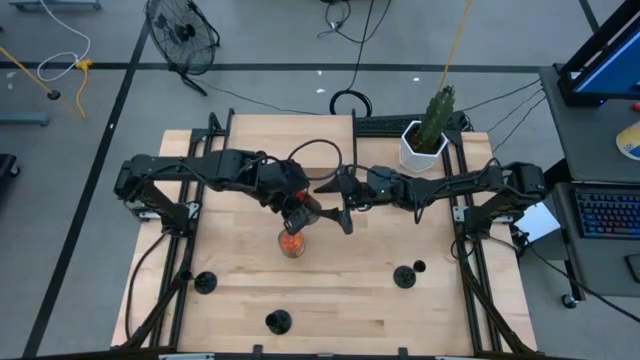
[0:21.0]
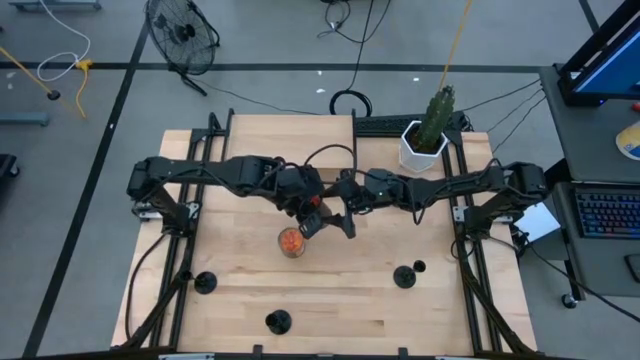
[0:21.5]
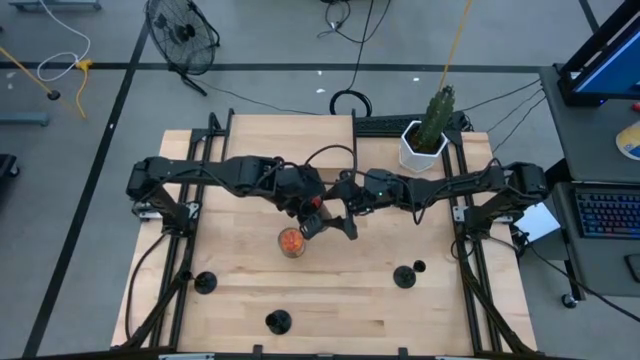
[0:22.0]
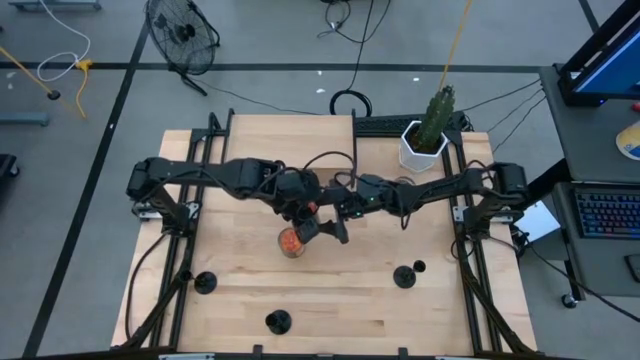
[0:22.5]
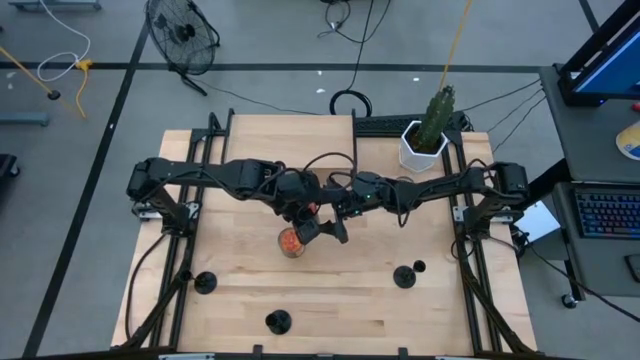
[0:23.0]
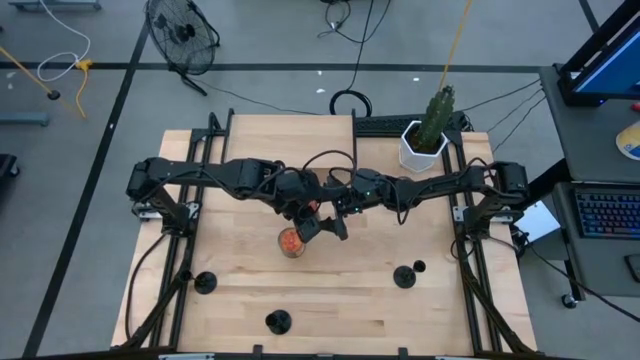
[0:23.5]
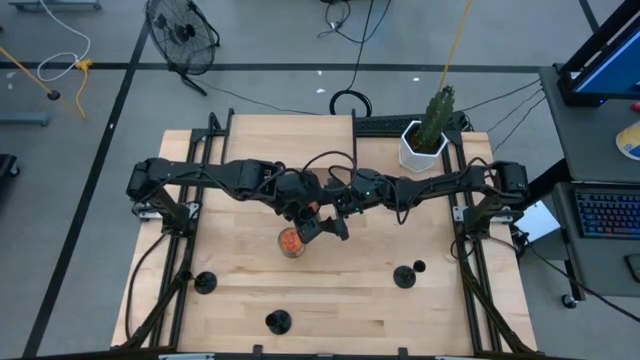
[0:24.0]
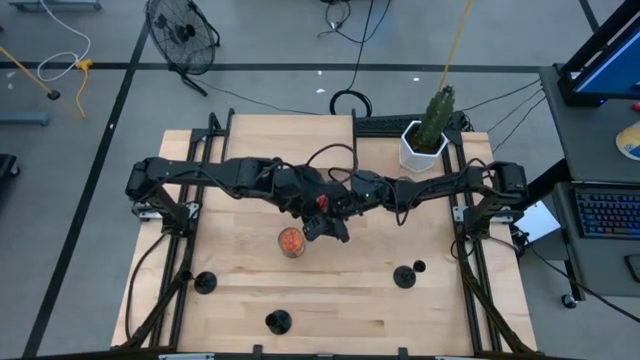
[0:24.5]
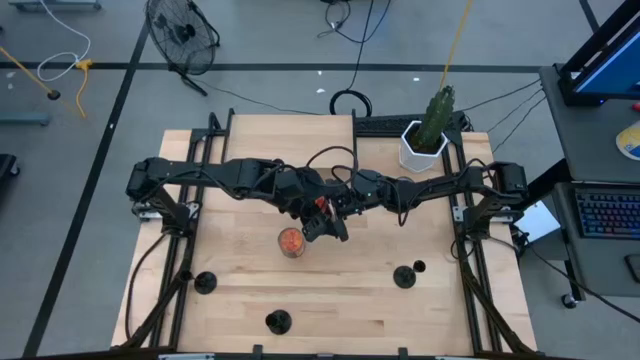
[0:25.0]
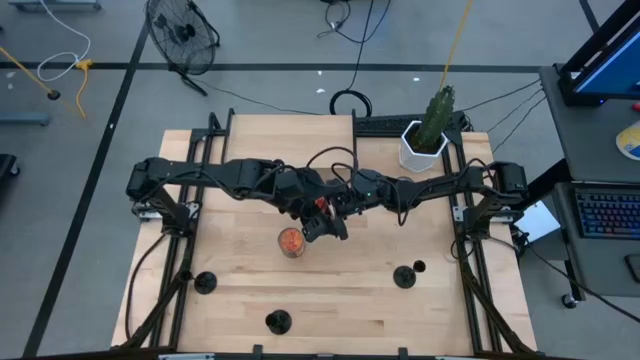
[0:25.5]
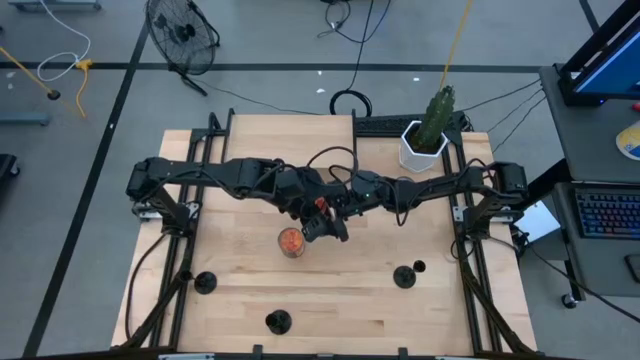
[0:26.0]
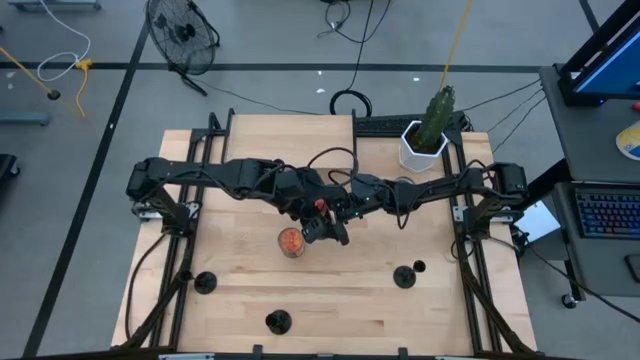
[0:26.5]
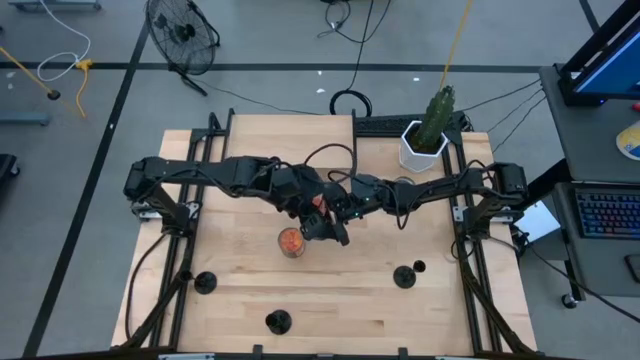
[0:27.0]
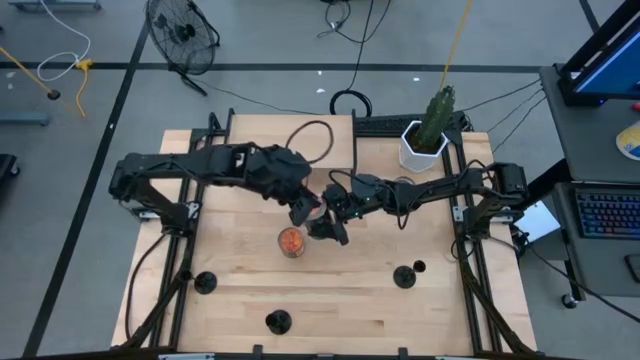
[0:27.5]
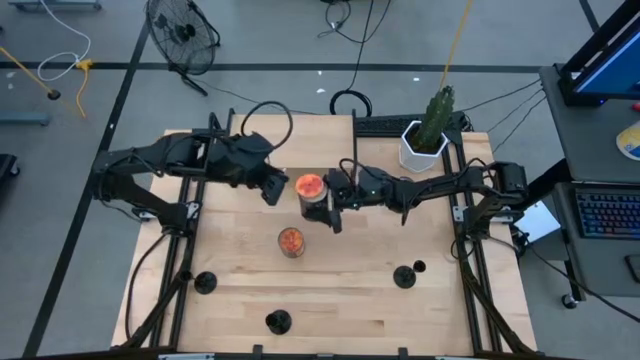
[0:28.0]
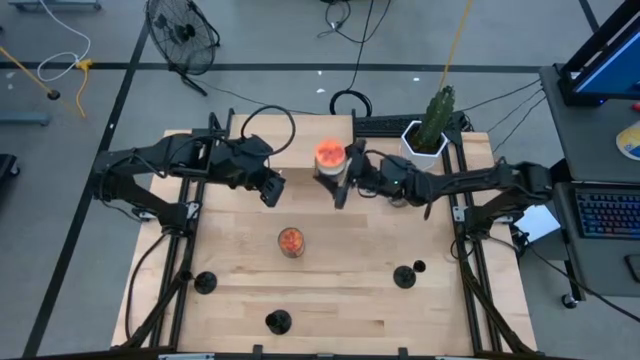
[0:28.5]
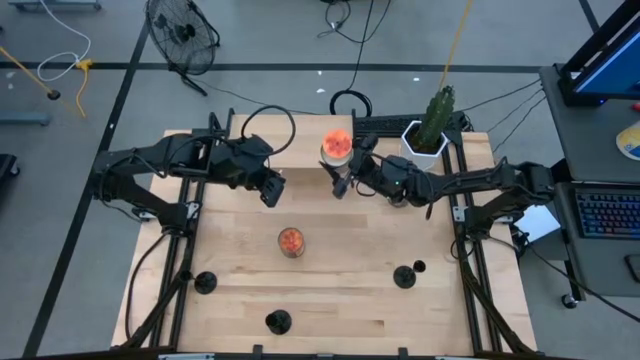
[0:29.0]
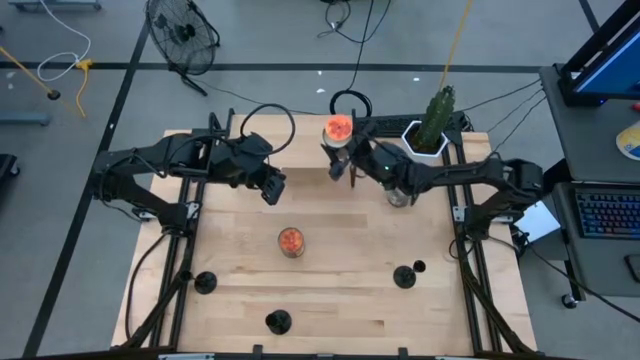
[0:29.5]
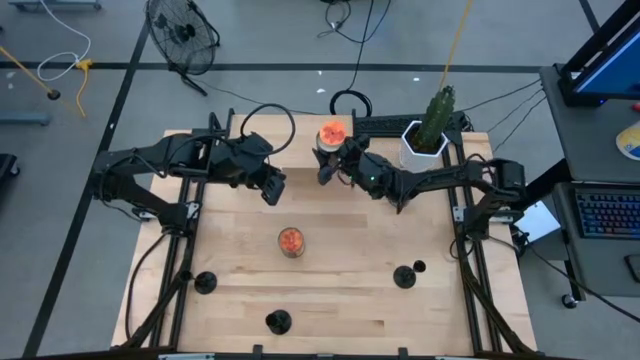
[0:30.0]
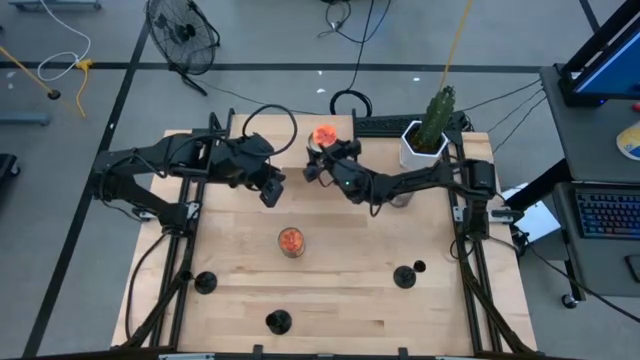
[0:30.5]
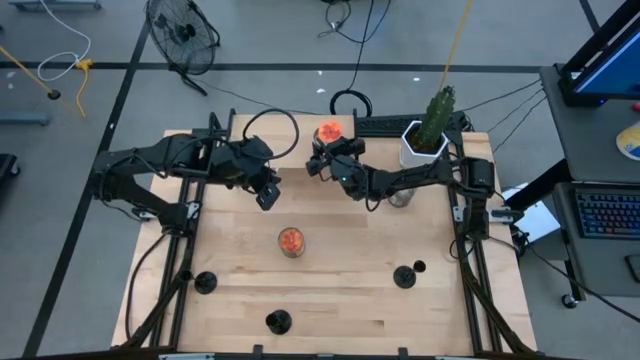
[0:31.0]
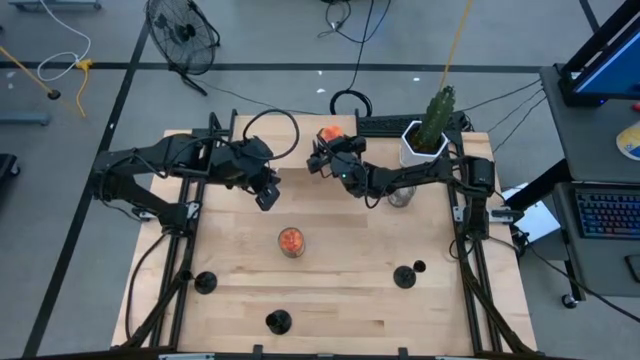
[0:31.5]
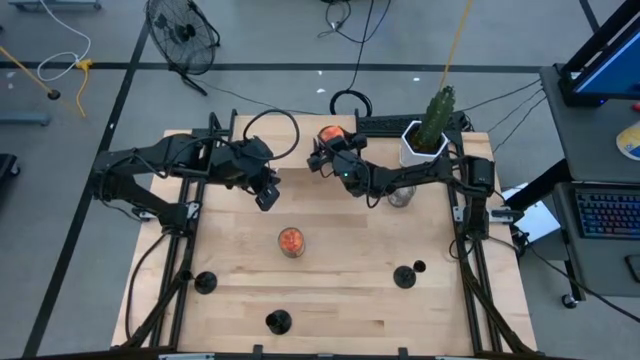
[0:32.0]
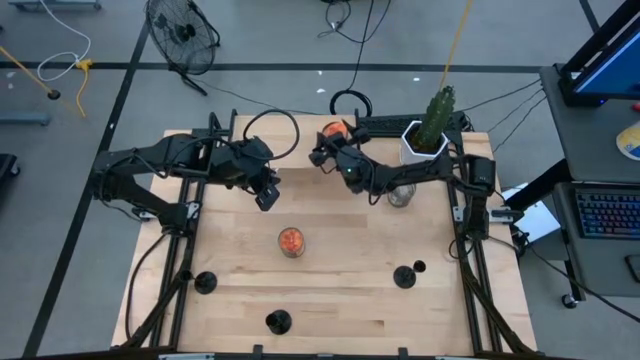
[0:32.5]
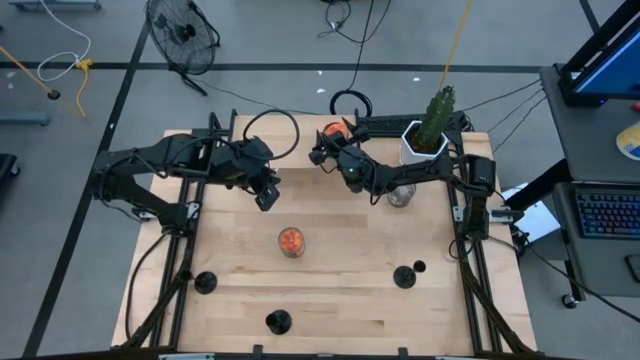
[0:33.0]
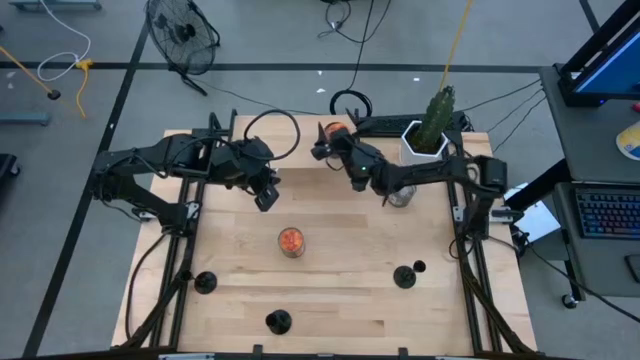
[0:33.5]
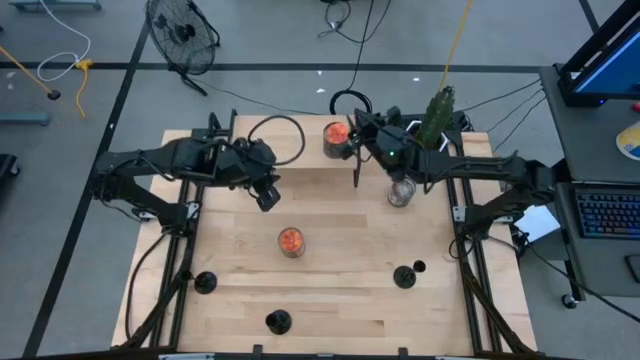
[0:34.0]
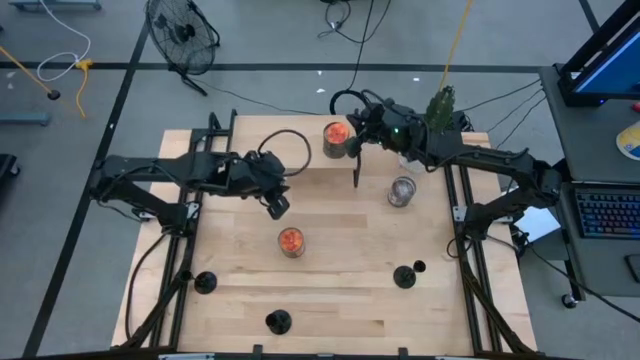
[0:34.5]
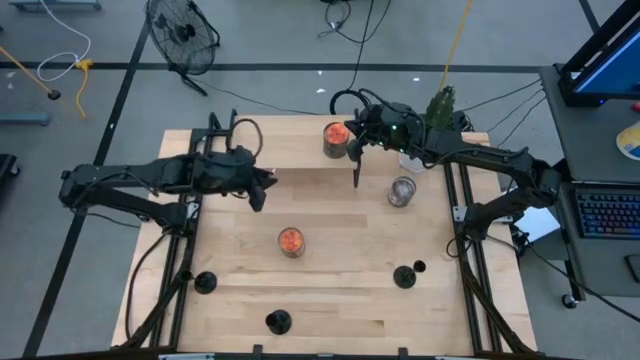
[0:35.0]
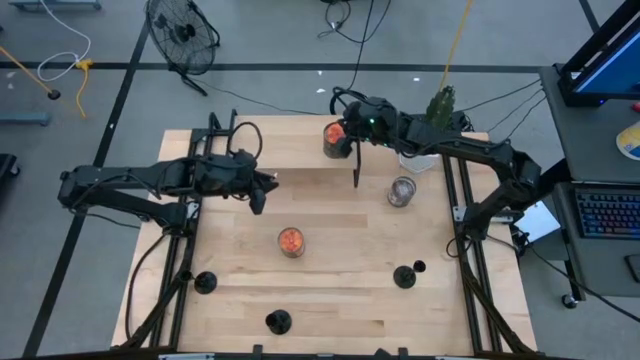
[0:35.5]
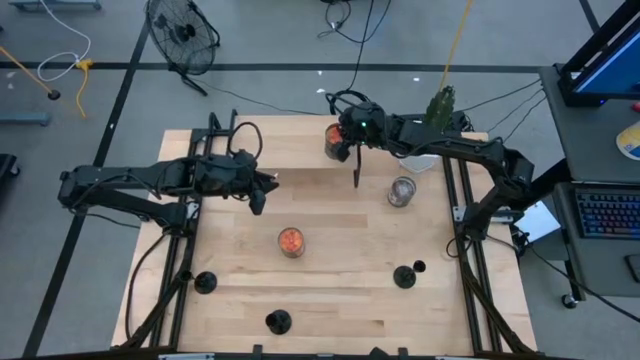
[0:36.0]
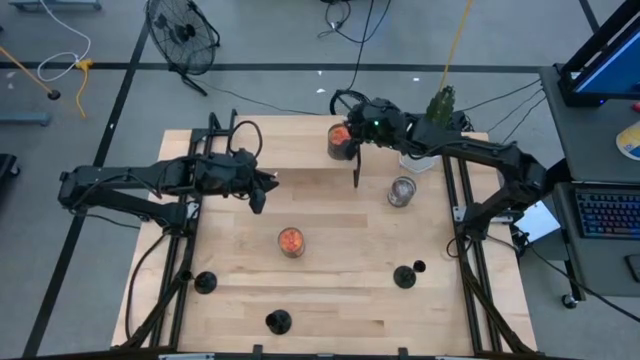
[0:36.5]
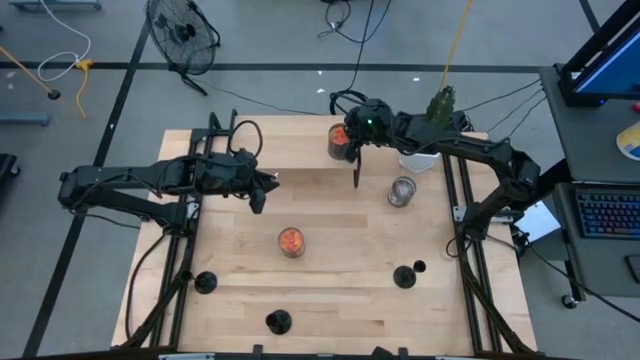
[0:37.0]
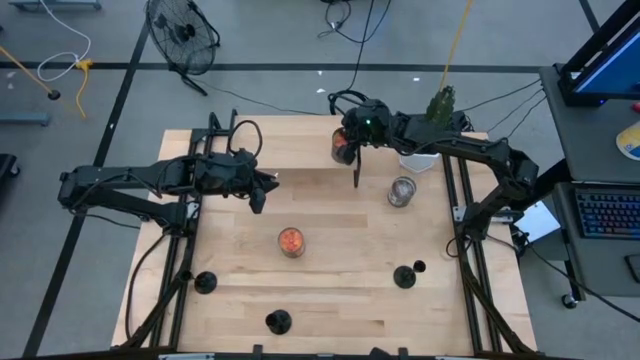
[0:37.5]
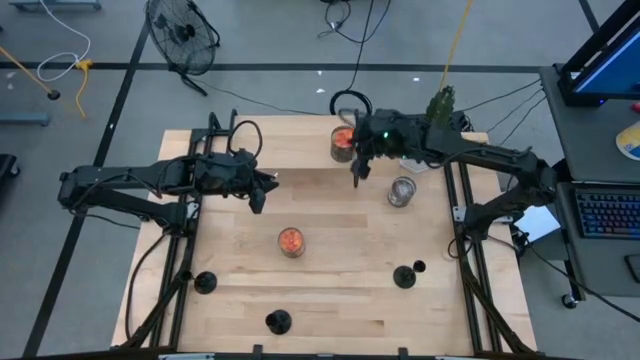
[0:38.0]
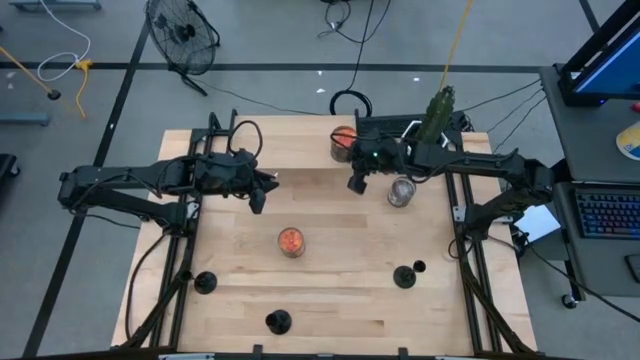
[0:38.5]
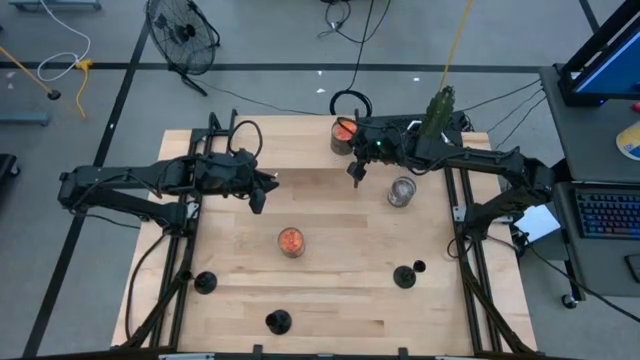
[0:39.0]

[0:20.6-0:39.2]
Task: Pick & Place candle stick holders
Put the top orange scented candle on the shelf

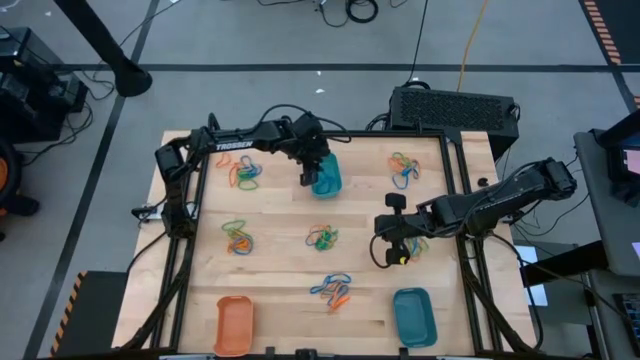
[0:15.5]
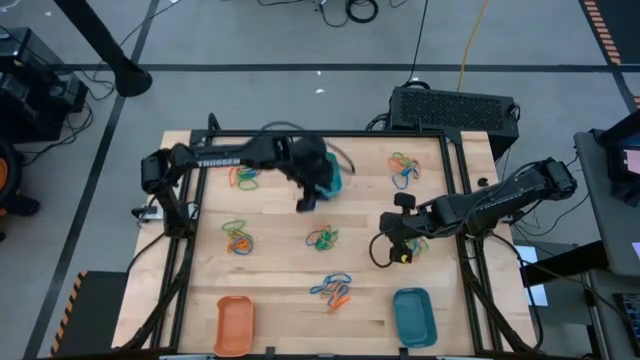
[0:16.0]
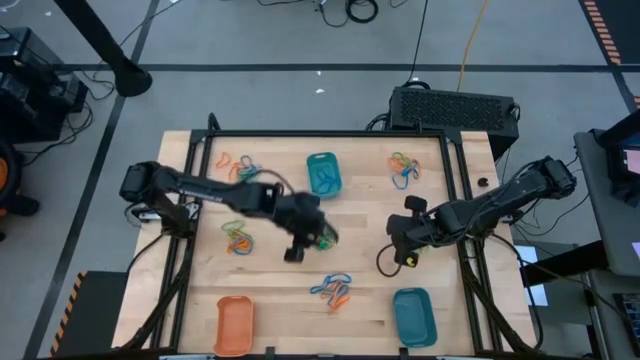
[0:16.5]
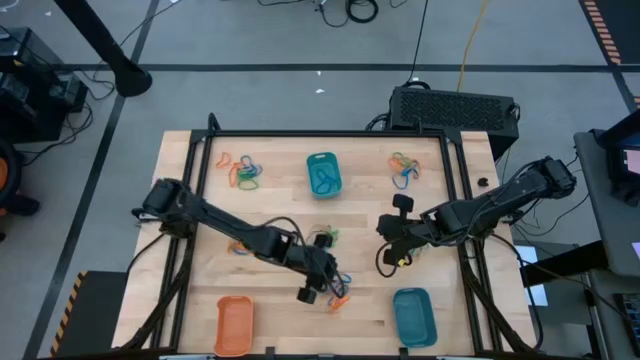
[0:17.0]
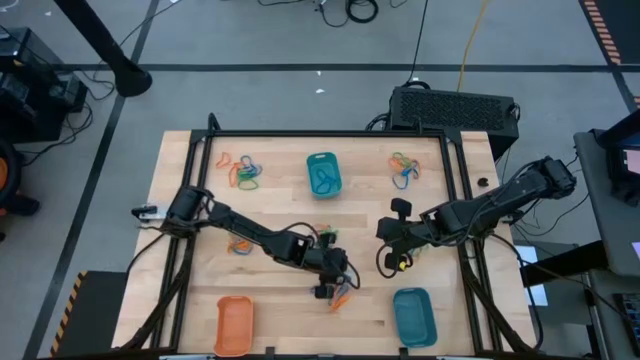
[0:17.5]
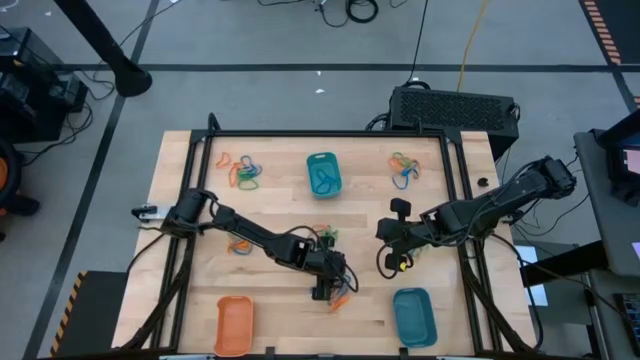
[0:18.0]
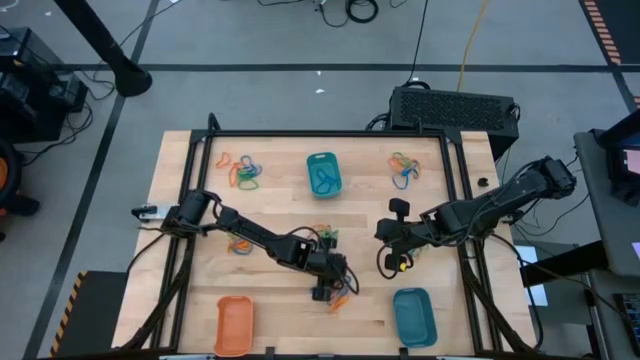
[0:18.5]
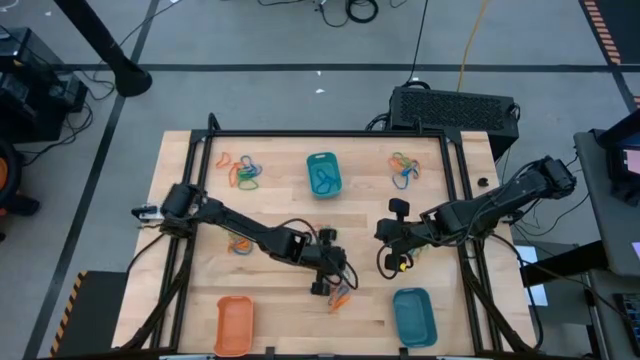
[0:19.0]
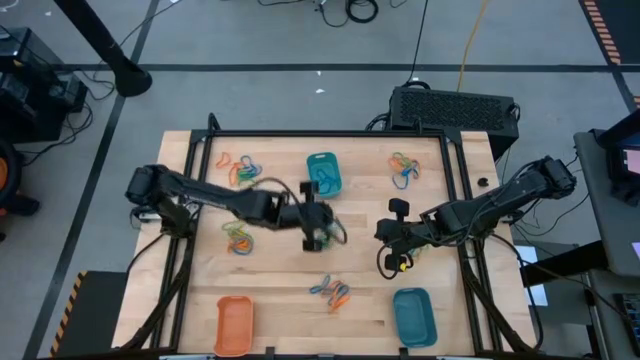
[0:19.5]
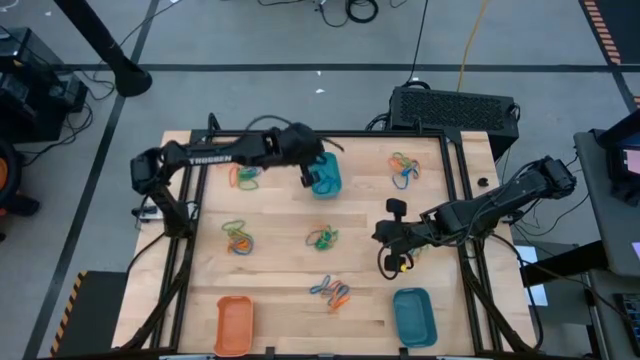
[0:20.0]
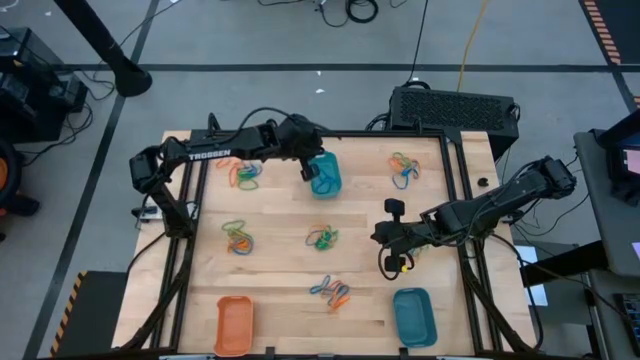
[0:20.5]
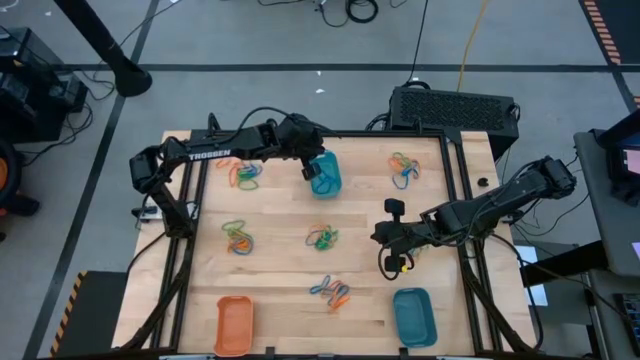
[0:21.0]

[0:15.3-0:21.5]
Task: Sort rubber bands into baskets
Put the blue rubber band into the top blue bin
